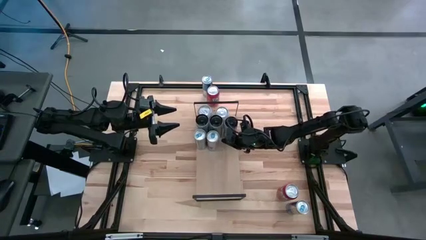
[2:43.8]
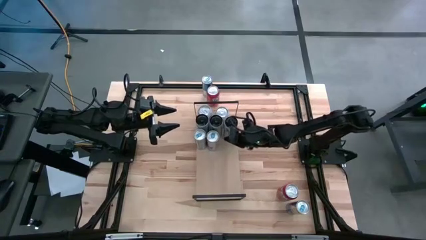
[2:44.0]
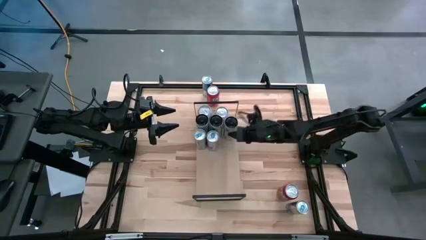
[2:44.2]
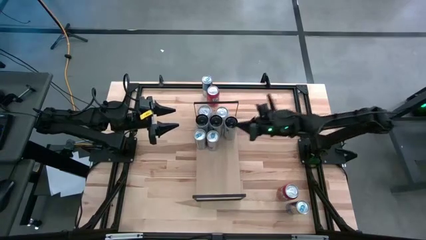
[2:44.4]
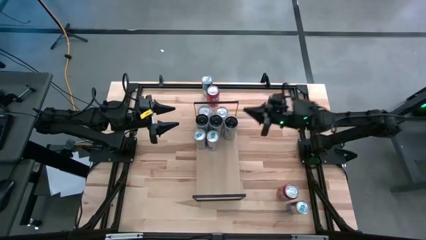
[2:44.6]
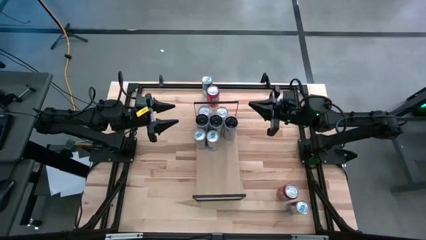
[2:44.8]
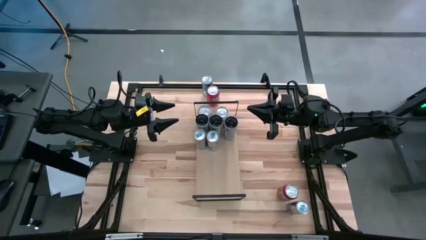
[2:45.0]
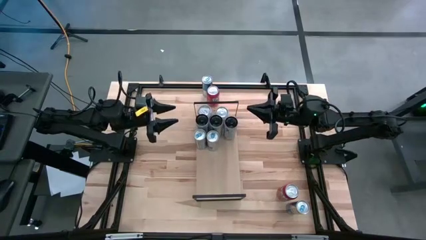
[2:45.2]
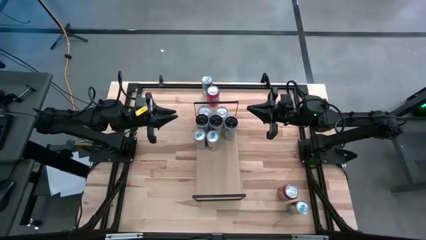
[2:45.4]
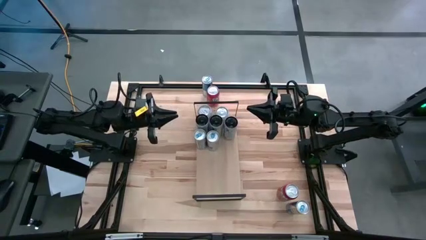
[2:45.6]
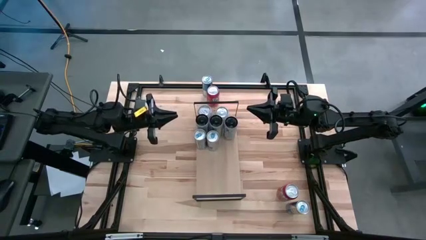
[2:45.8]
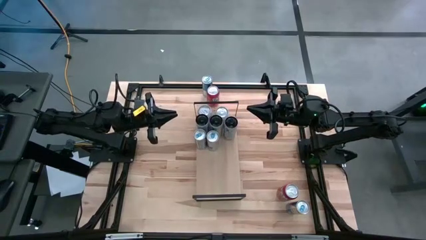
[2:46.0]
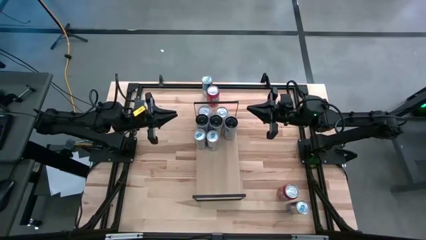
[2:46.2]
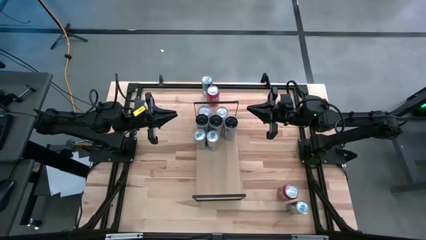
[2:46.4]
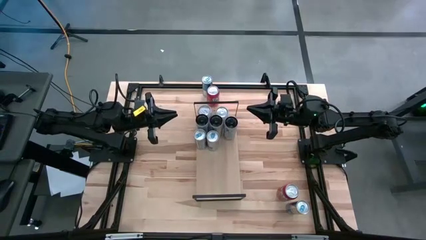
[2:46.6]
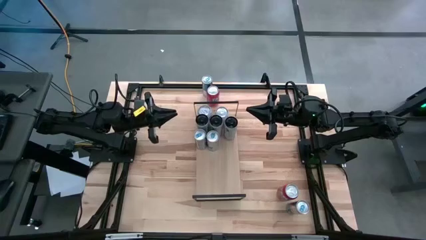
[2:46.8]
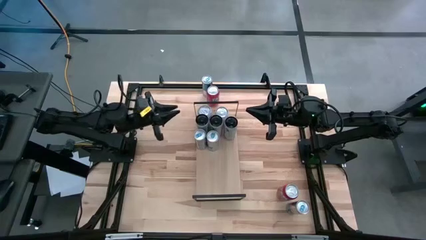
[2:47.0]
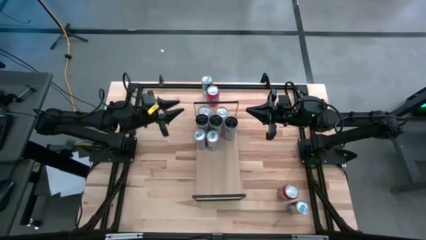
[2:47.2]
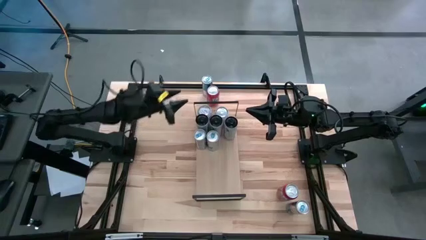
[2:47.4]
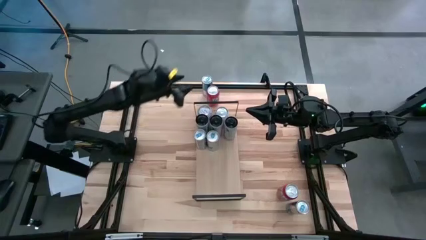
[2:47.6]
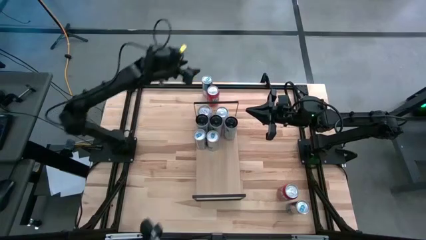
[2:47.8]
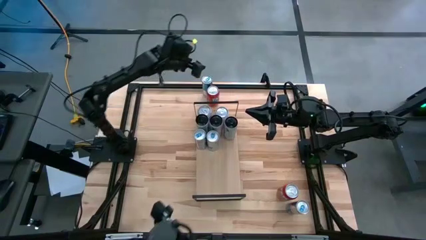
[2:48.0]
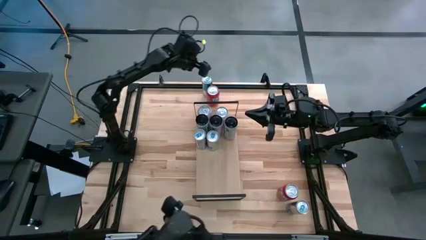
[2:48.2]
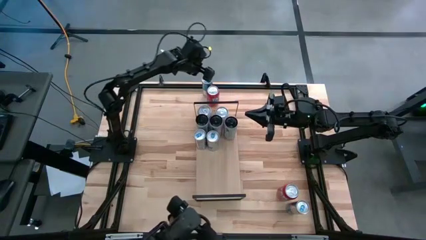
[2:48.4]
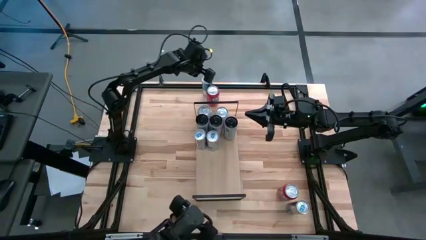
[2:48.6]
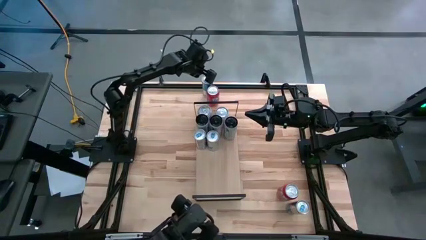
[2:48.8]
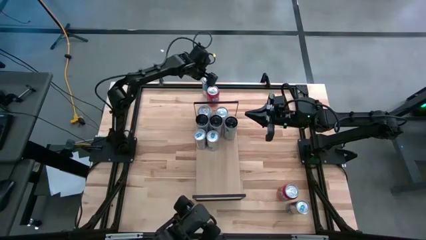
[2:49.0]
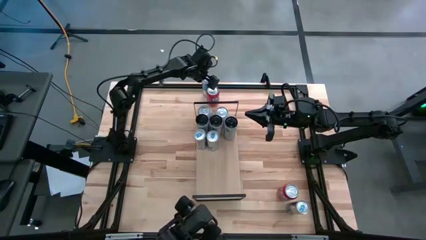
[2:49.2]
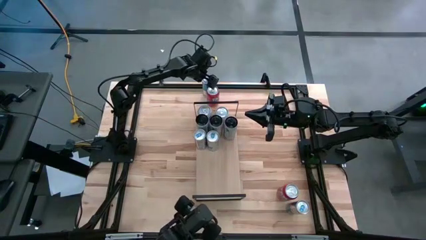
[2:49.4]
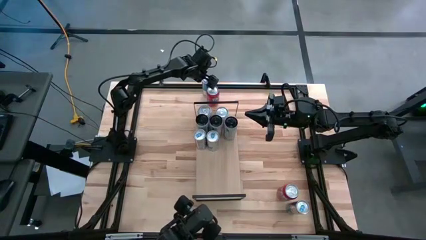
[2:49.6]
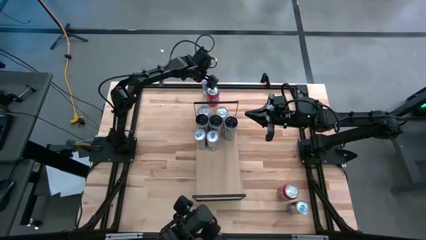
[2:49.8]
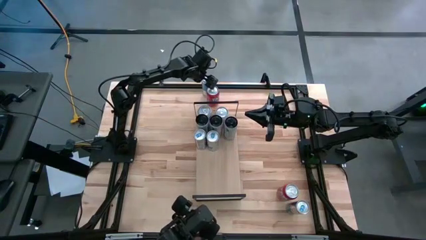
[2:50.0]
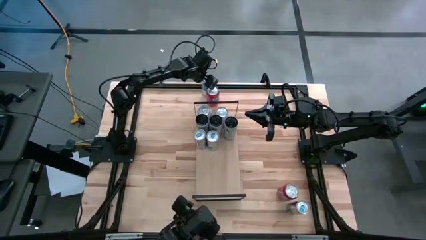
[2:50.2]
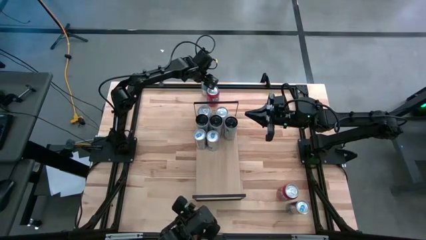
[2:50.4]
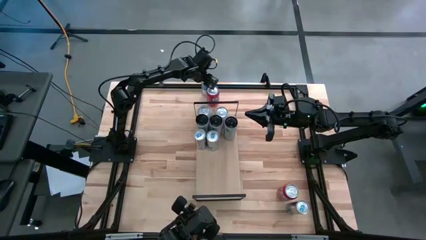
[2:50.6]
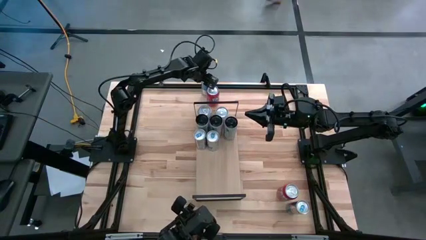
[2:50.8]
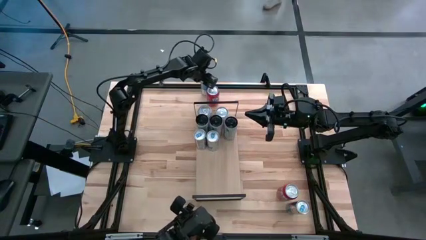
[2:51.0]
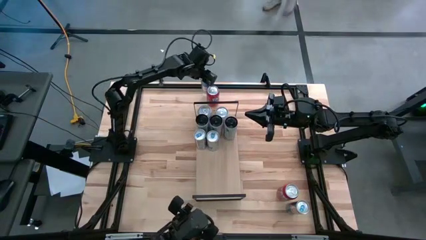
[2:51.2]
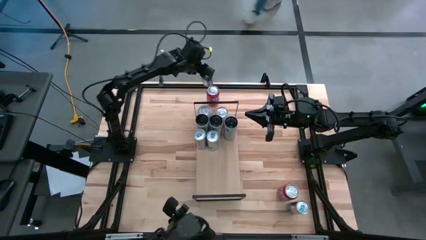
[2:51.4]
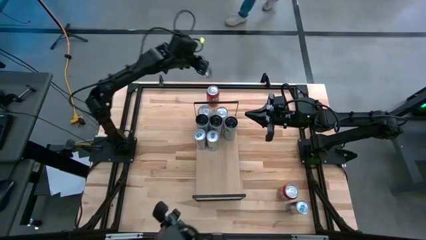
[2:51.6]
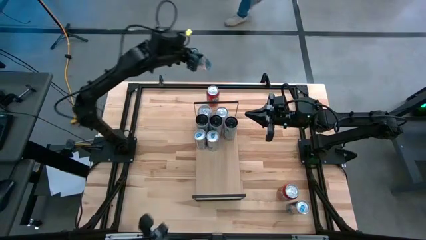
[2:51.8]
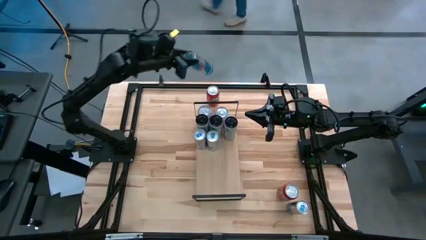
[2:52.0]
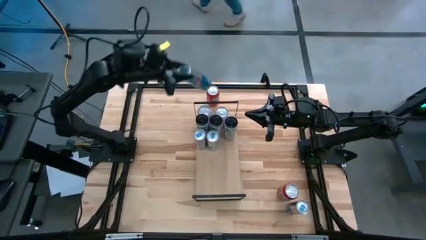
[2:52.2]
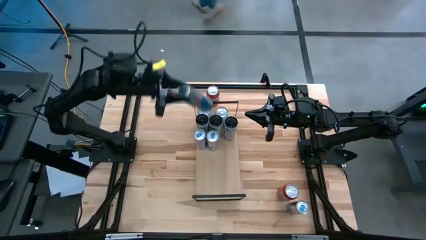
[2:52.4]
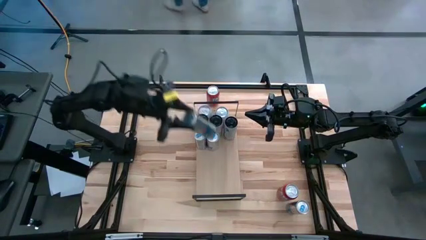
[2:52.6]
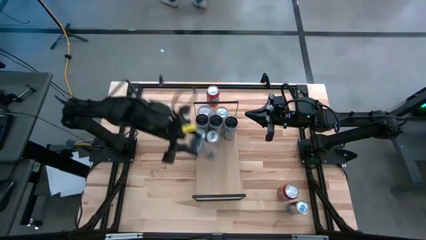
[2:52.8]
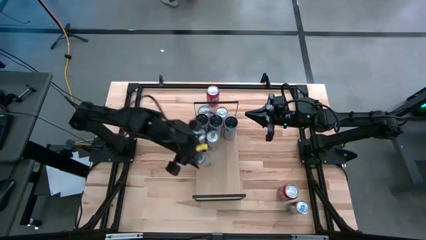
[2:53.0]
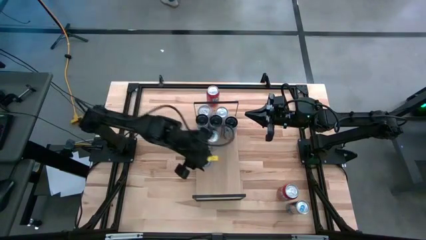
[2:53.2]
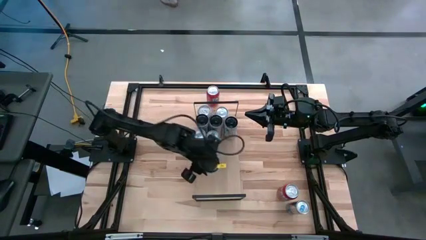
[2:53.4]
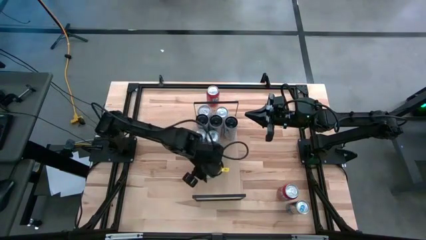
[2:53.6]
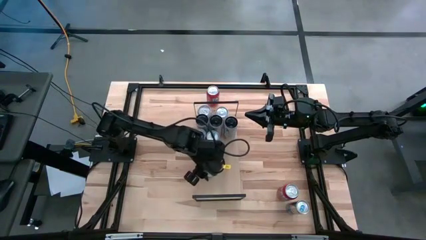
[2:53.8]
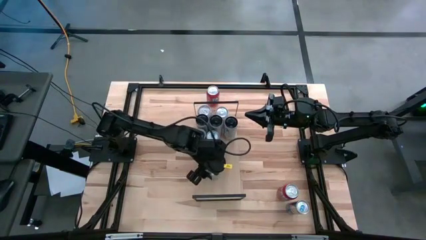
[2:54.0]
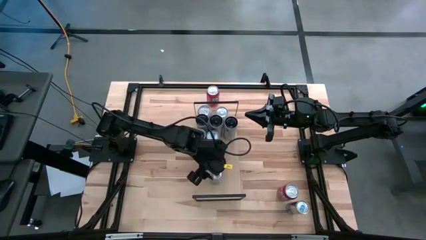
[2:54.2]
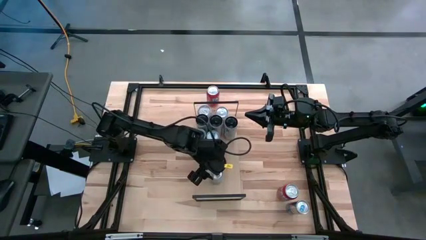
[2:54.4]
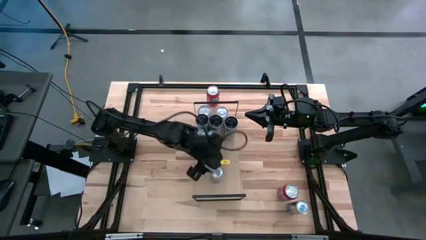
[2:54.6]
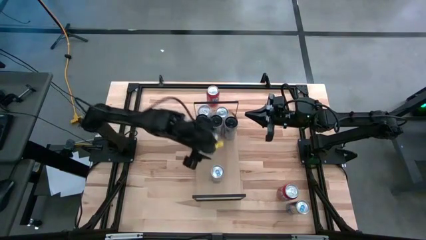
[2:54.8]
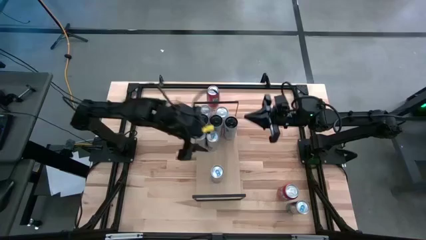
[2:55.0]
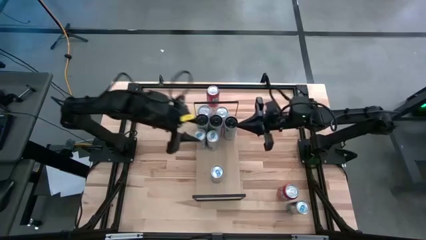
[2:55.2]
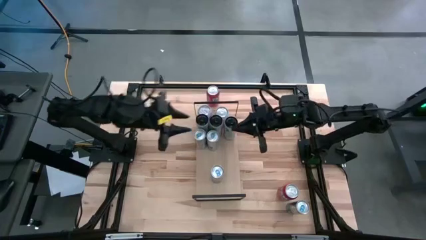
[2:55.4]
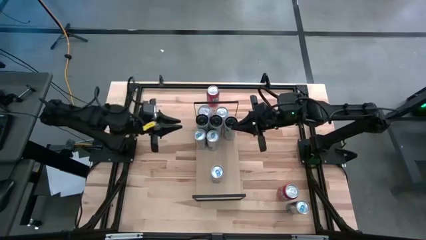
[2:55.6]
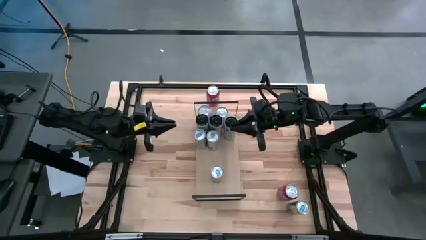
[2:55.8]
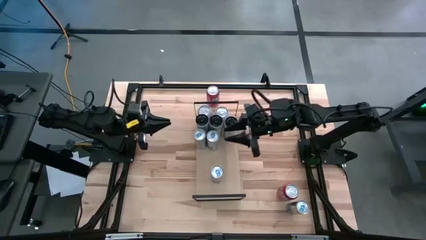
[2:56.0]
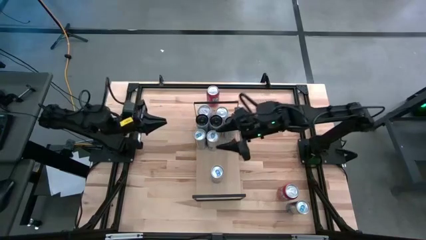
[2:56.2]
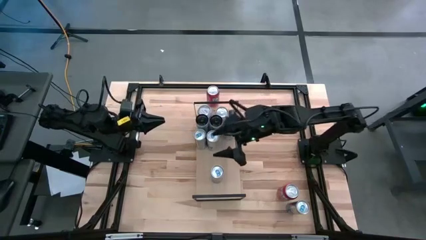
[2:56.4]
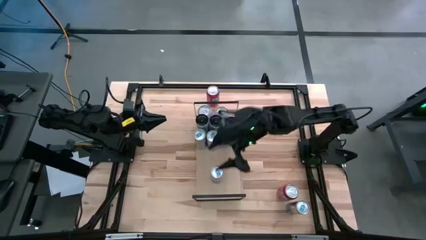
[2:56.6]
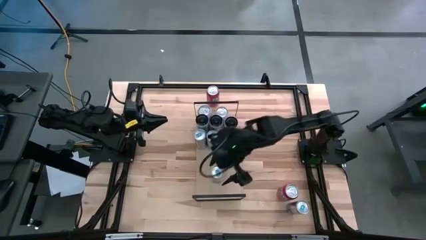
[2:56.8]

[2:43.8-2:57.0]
Task: Place canned beverage on shelf
Put the top blue soda can on the shelf aligned with the other blue soda can

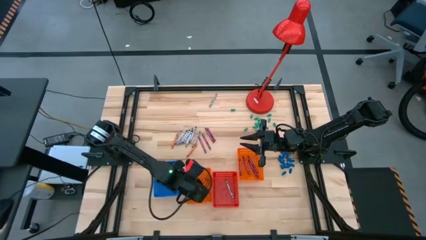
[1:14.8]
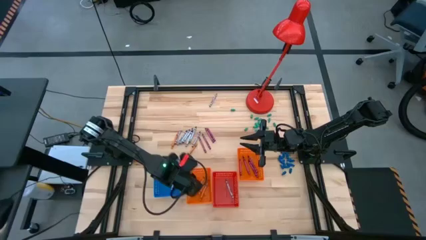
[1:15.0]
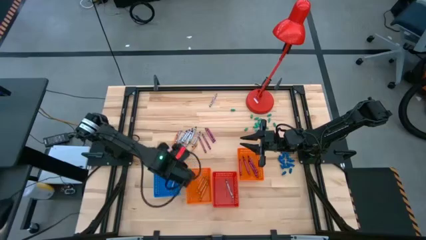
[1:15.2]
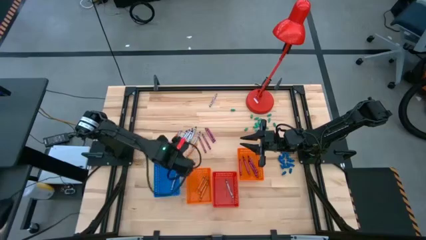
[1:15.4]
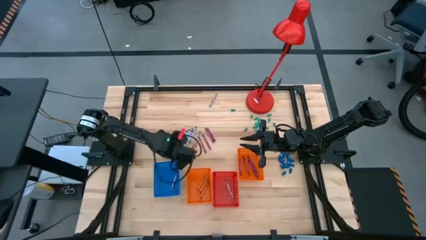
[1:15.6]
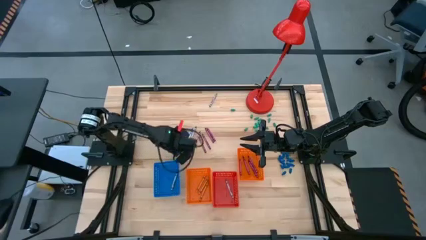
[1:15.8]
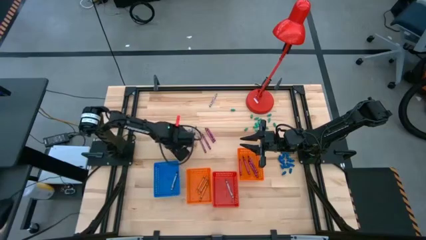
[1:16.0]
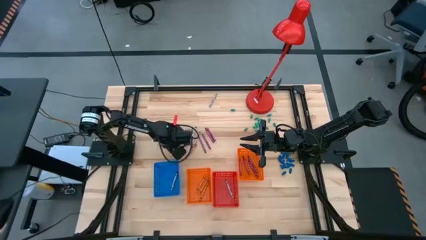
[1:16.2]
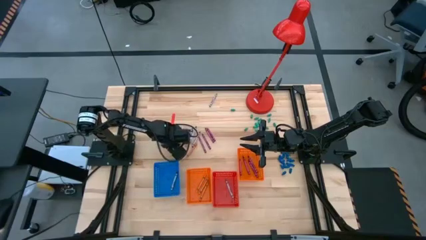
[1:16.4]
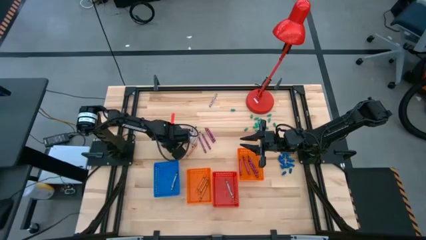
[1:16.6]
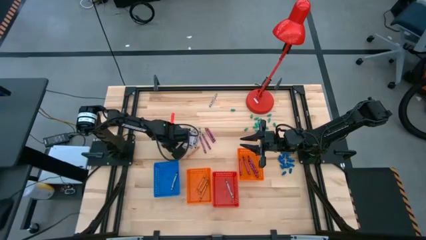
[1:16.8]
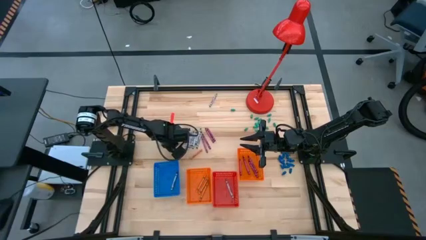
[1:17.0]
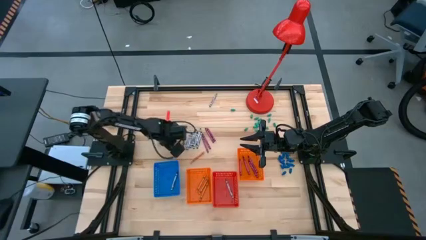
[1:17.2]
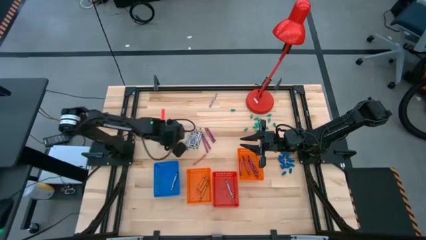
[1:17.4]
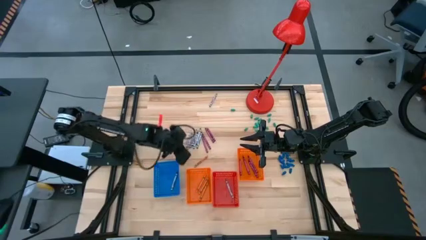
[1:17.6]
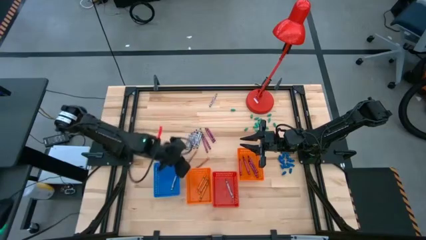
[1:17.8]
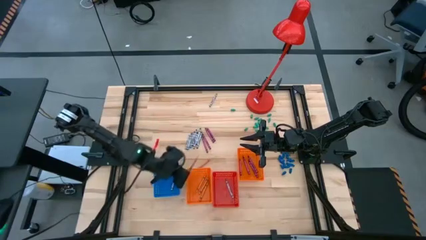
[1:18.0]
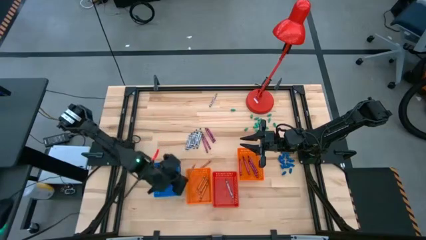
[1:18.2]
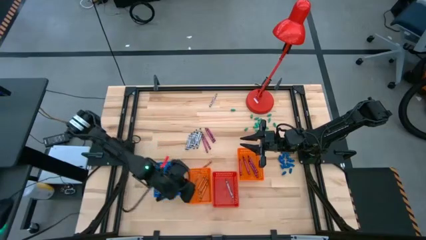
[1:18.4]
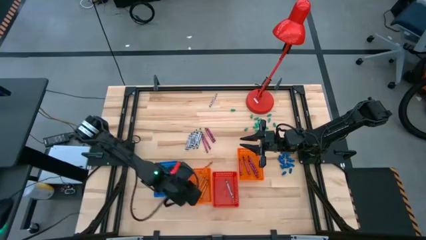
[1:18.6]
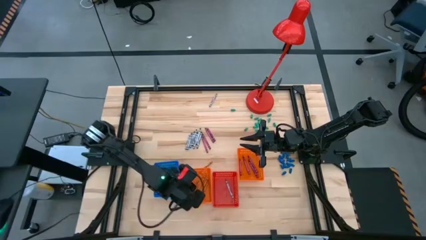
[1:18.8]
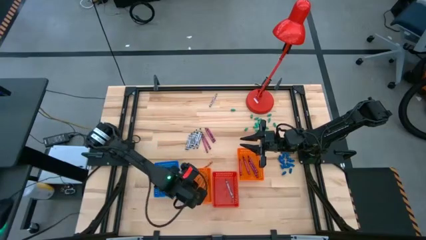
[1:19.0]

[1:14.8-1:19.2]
Task: Sort crayons
Put the orange crayon into the left orange bin
